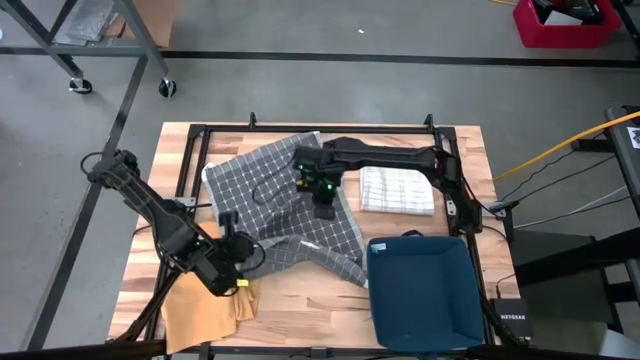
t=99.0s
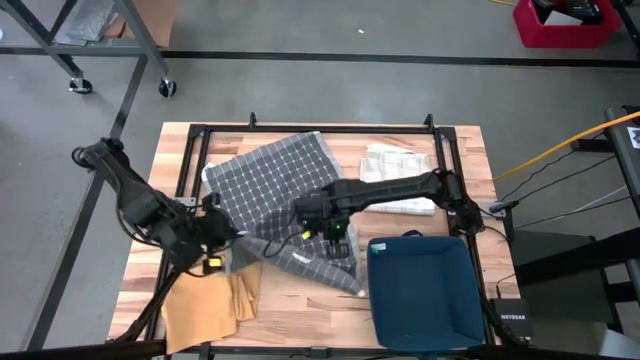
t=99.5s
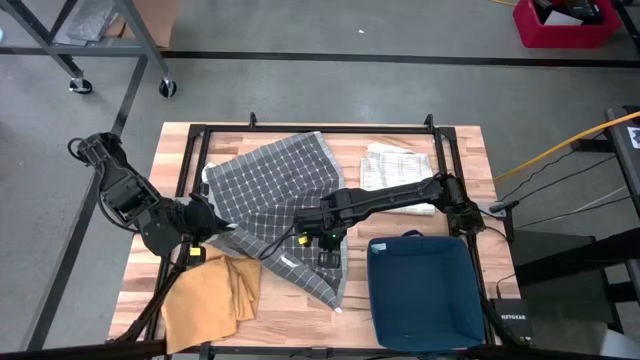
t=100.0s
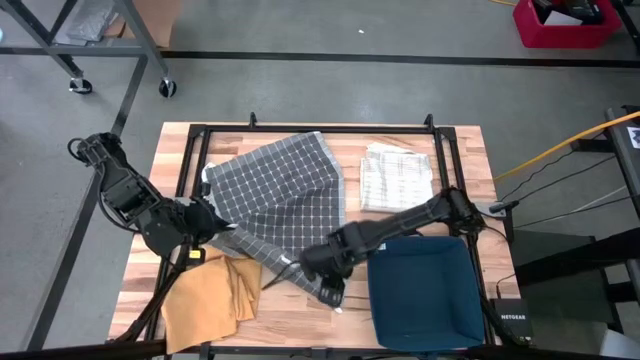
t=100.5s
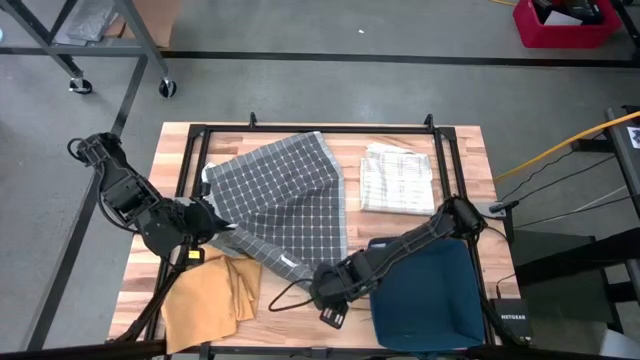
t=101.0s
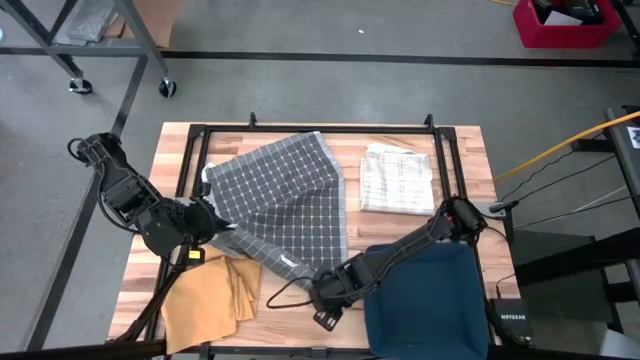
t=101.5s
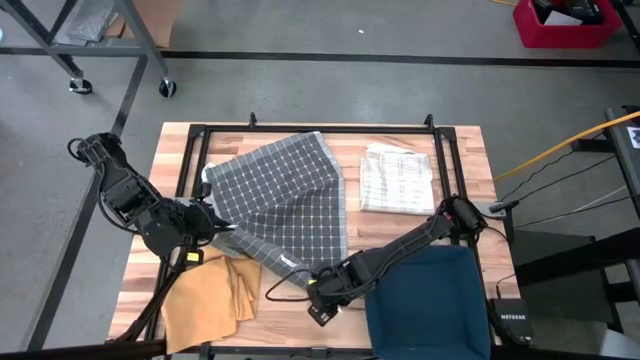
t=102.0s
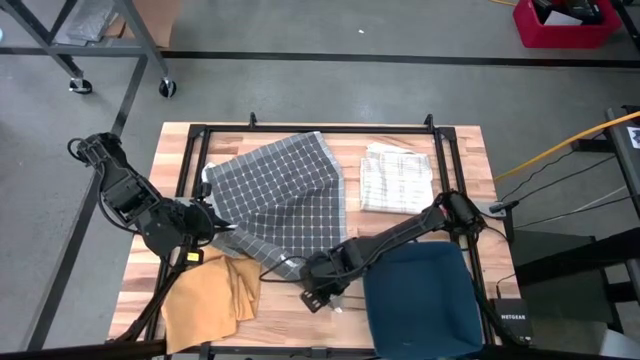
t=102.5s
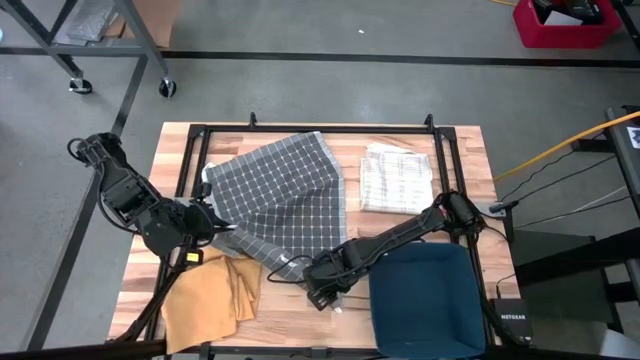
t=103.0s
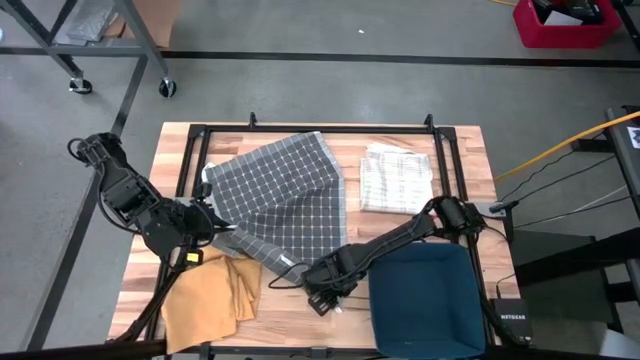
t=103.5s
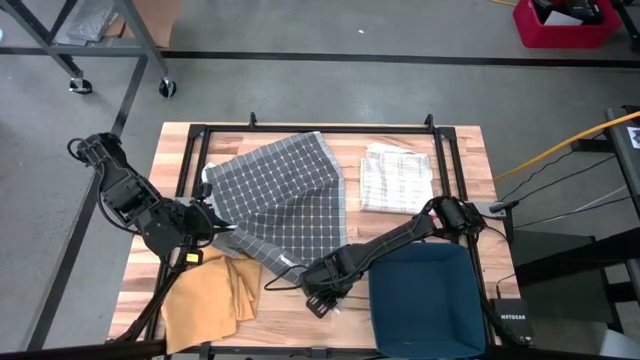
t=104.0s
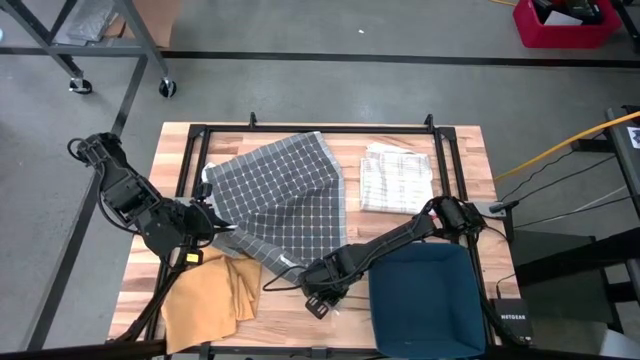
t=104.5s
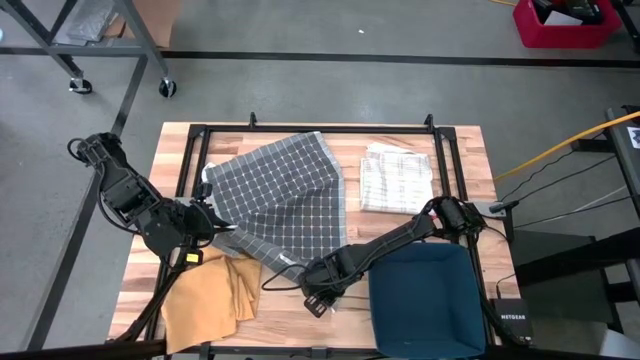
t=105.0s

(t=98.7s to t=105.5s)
Task: Fold towel
Fold the gray towel

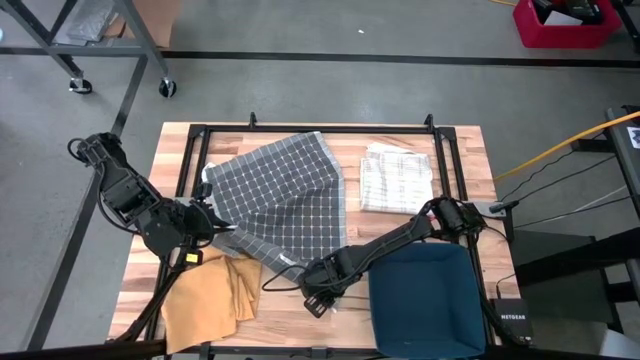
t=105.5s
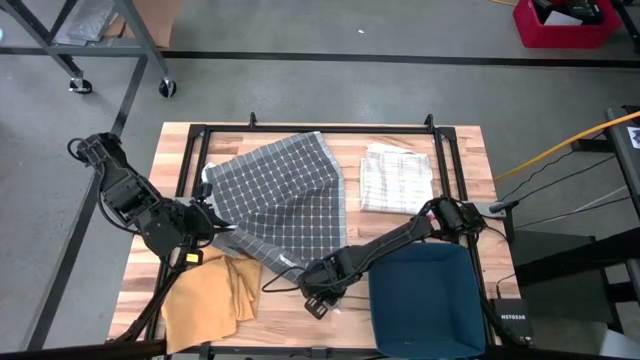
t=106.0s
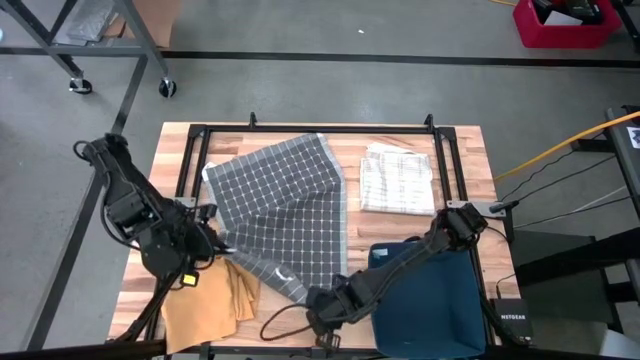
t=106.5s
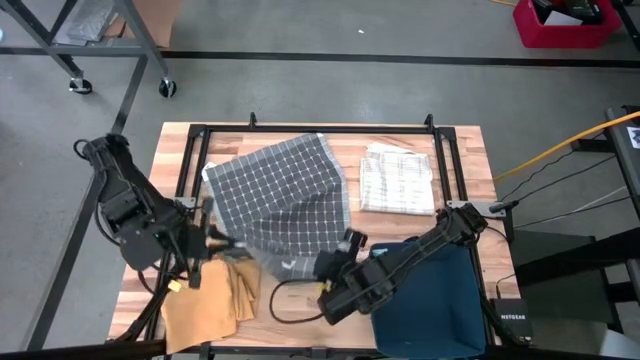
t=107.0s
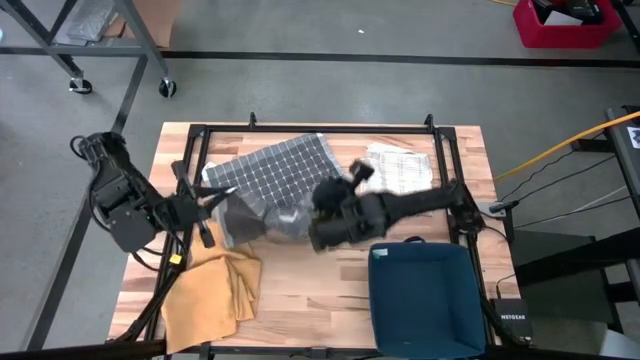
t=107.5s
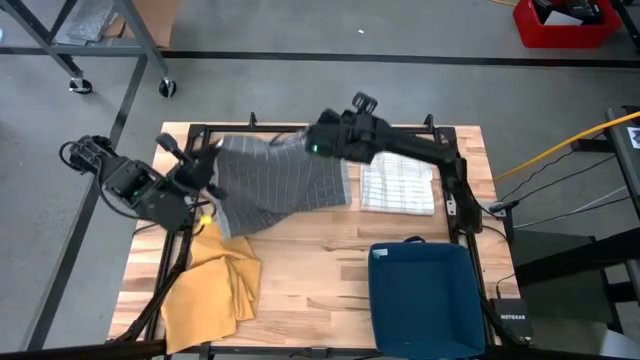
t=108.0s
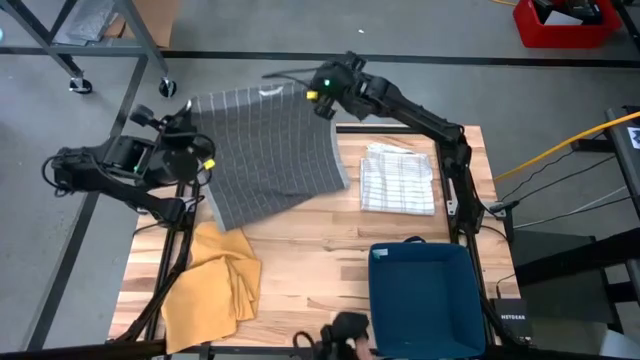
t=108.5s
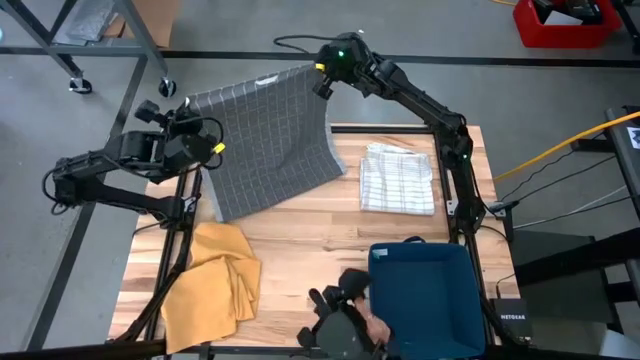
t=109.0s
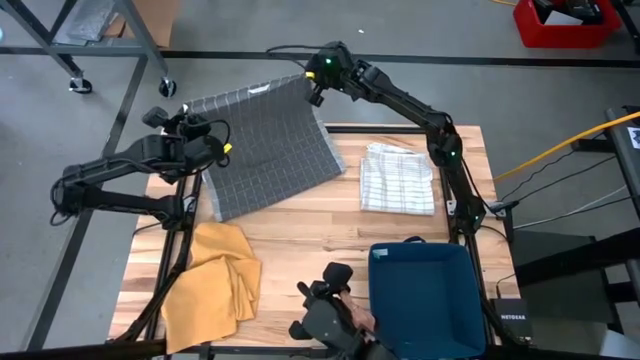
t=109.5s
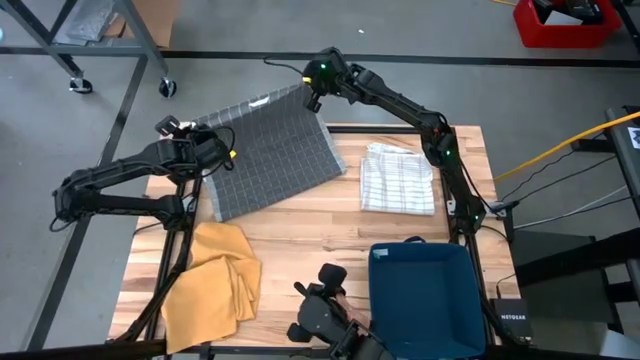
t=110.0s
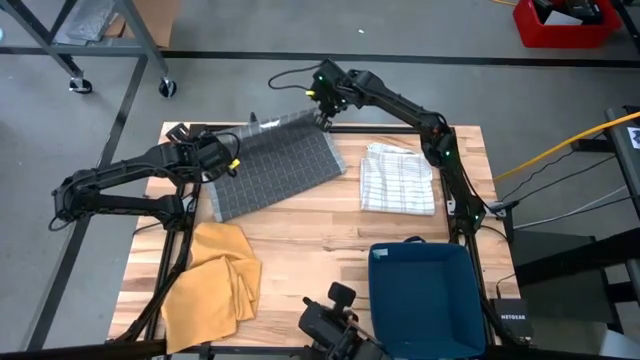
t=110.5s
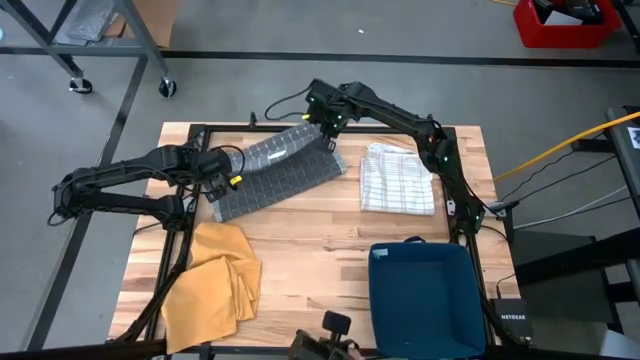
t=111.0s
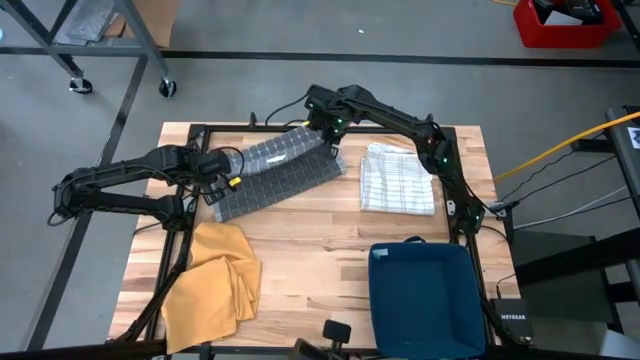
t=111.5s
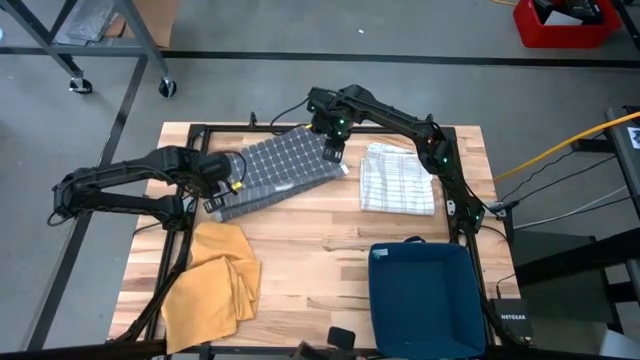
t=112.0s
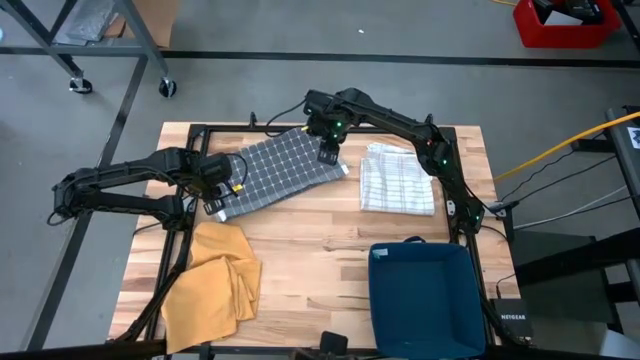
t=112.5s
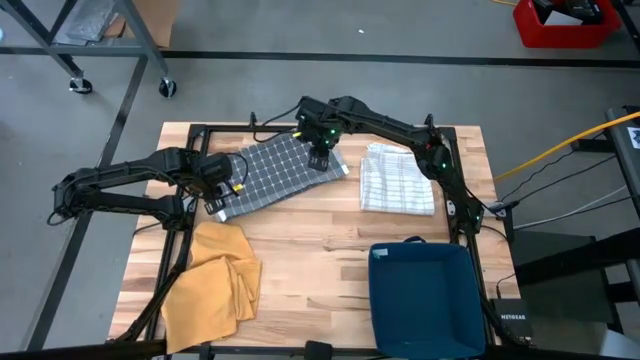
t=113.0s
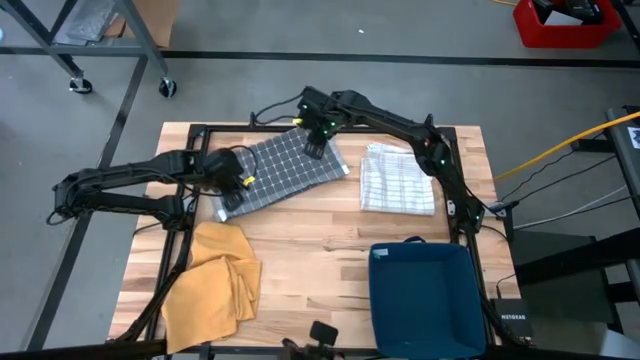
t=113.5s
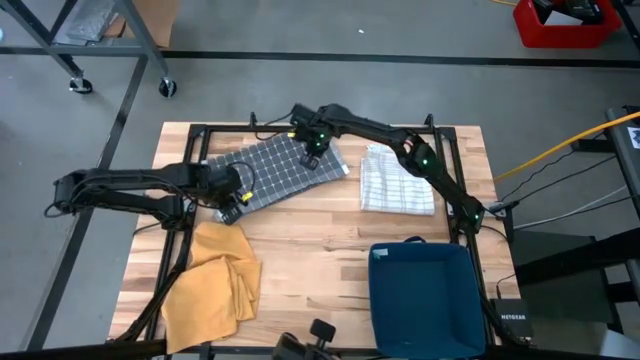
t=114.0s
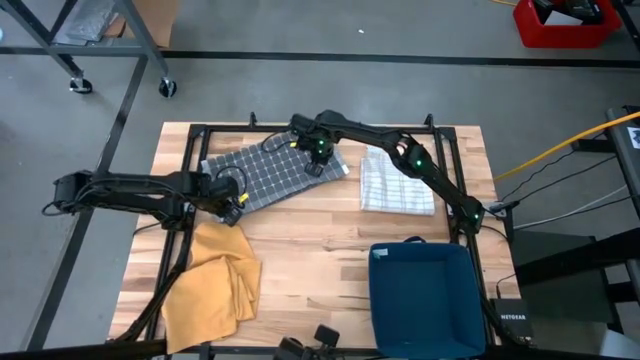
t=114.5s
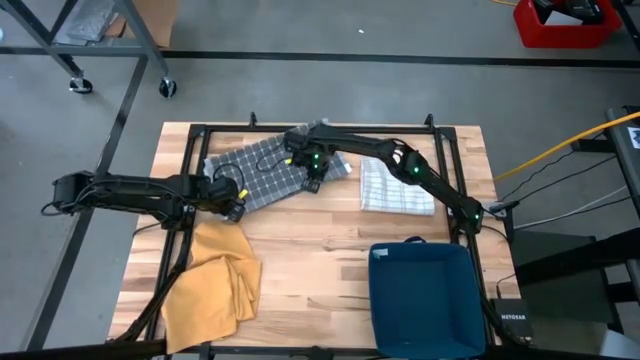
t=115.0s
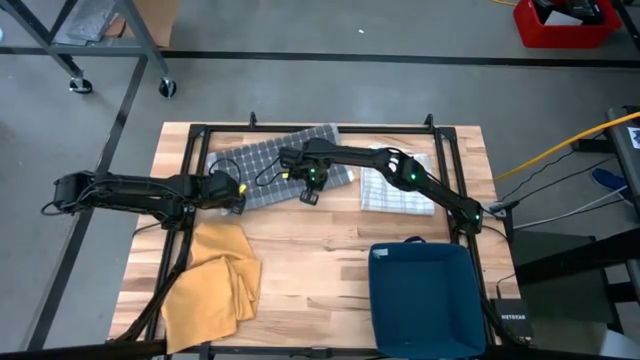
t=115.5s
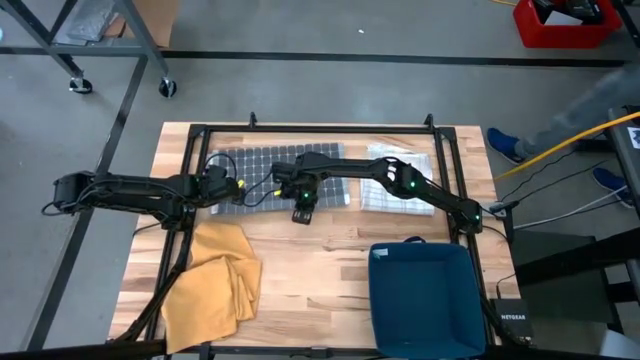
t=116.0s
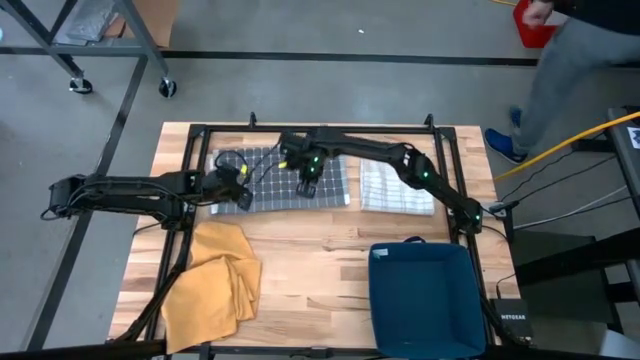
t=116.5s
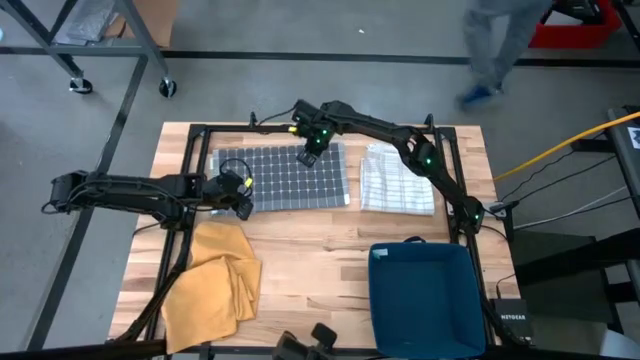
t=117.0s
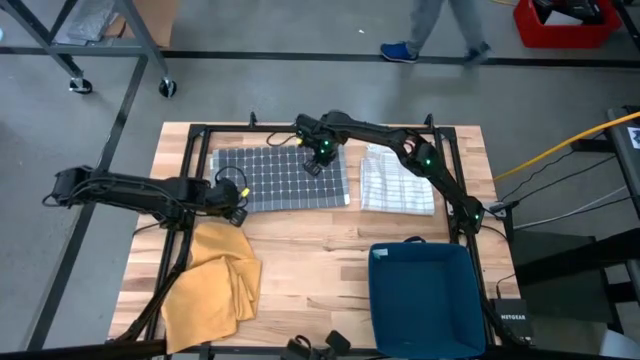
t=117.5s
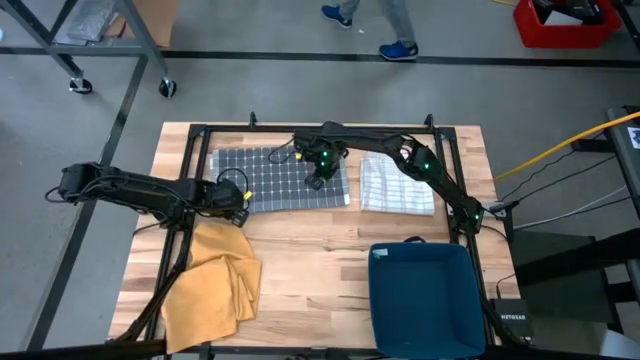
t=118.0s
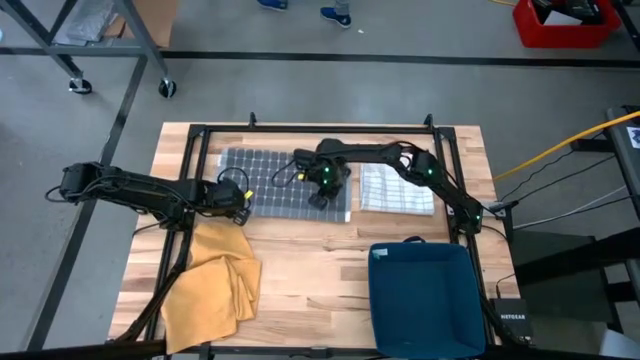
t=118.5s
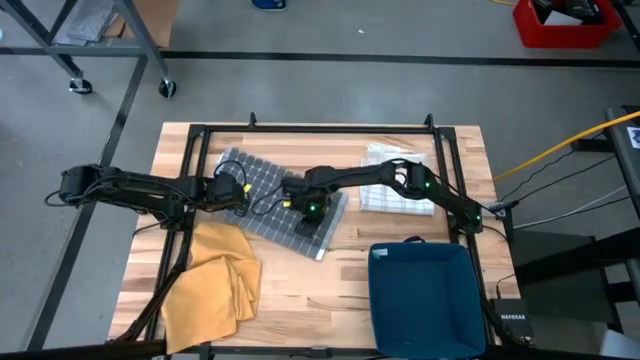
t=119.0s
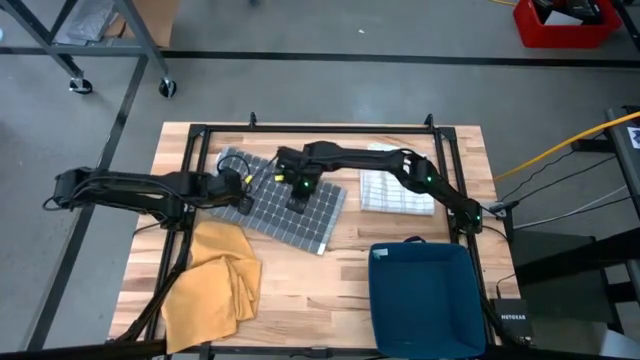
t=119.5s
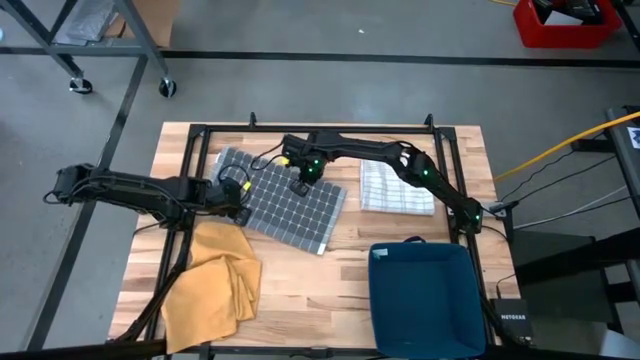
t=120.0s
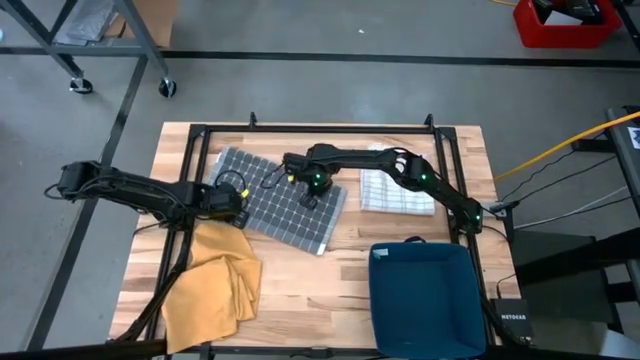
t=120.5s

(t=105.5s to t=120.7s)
Fold the gray towel
